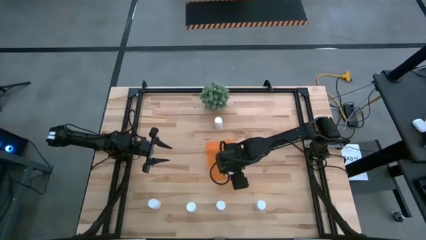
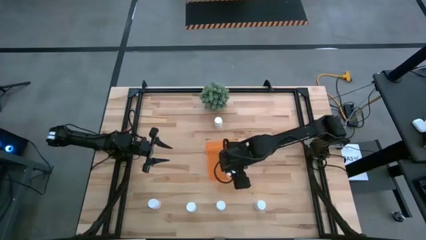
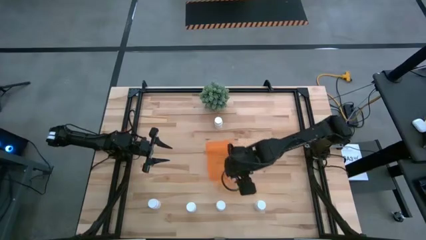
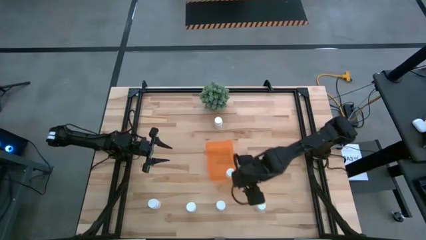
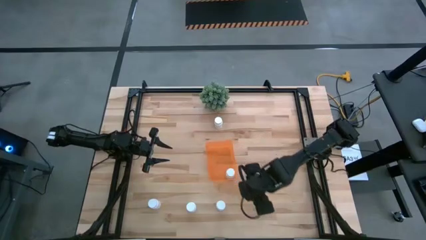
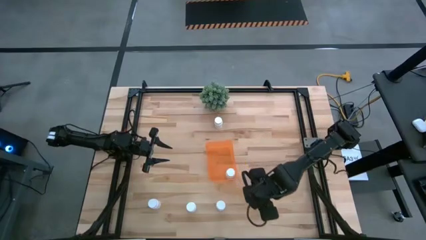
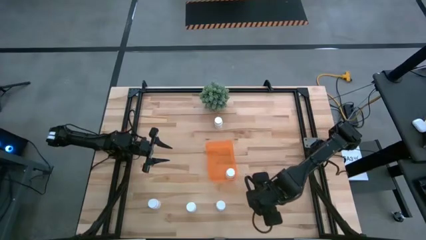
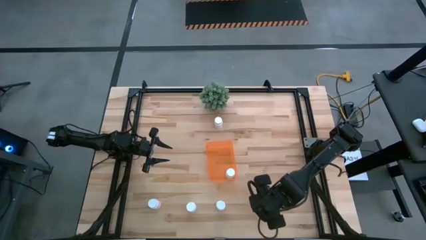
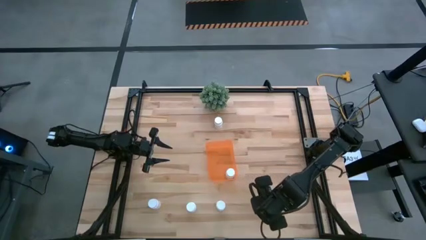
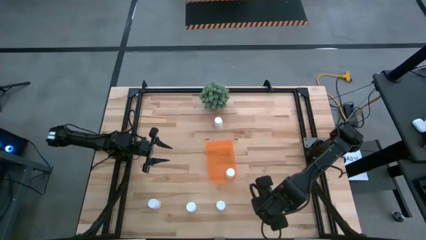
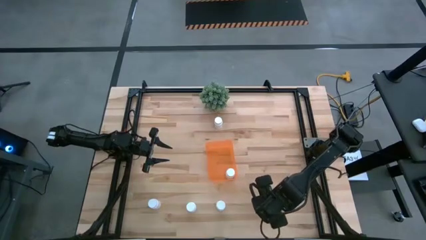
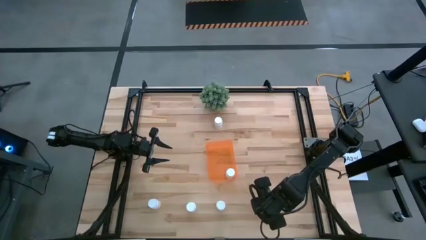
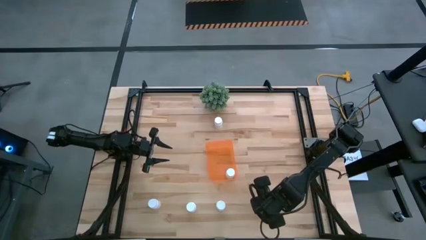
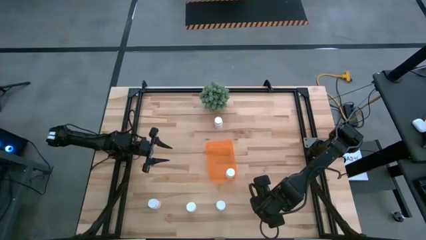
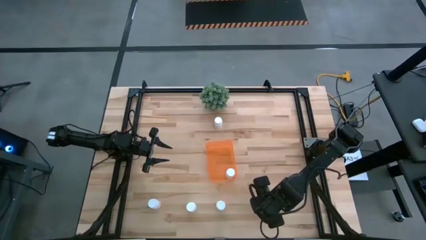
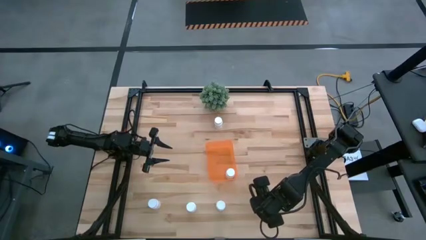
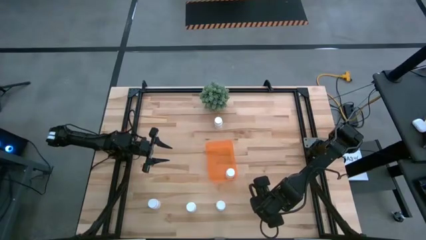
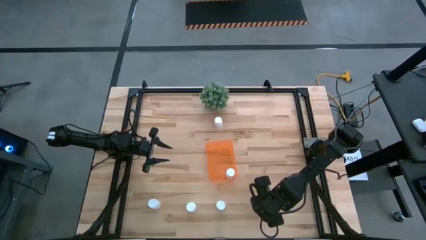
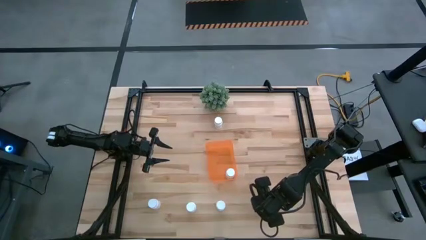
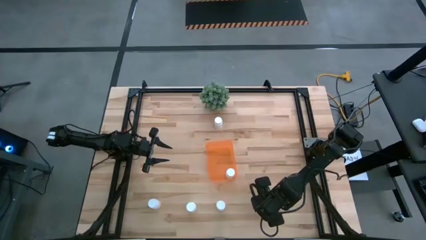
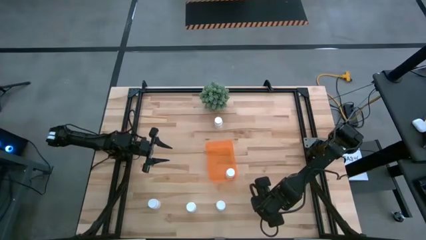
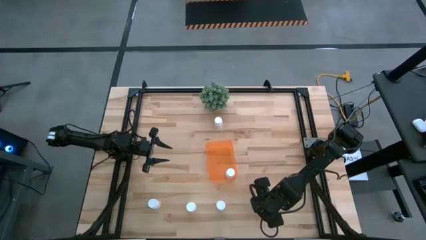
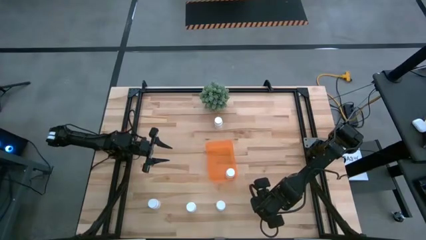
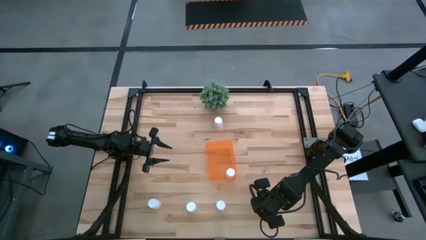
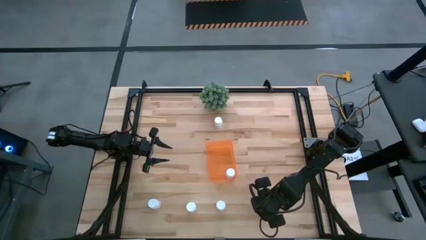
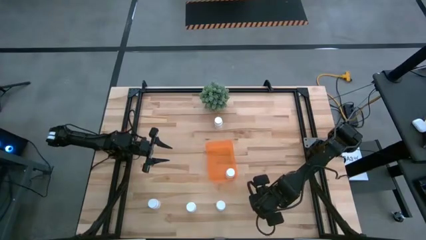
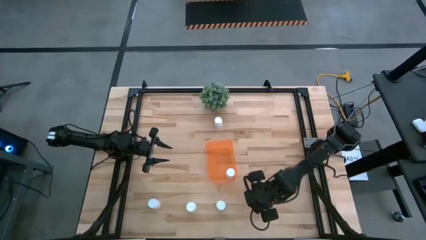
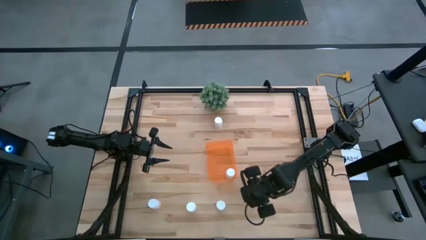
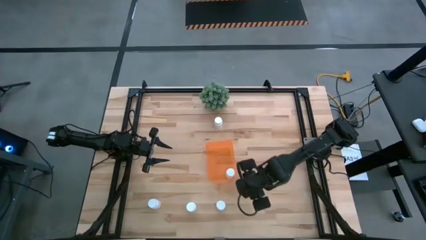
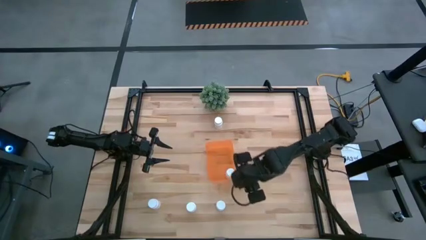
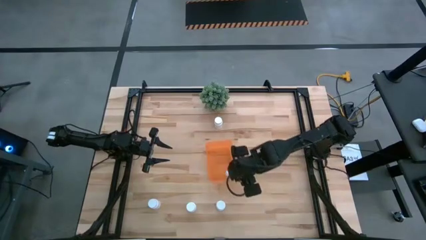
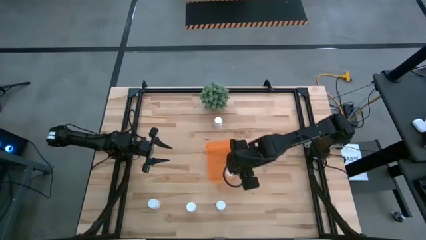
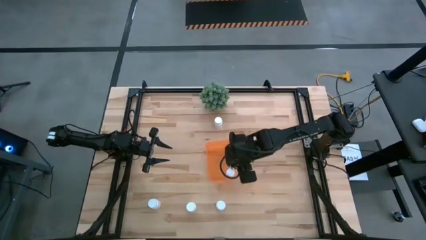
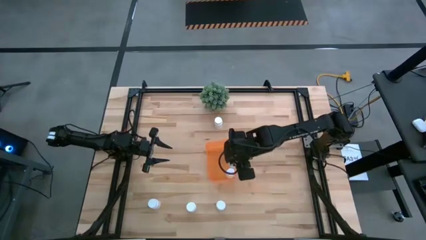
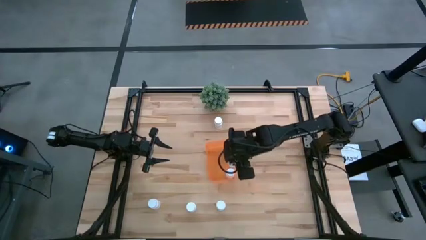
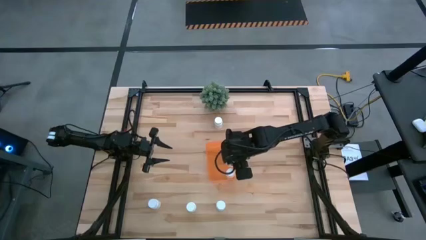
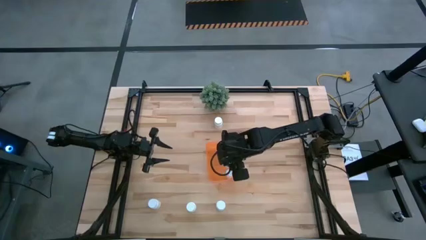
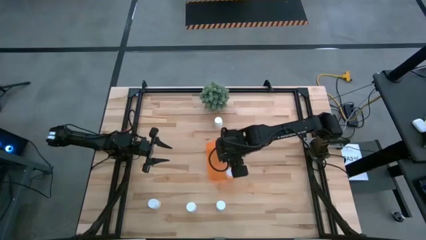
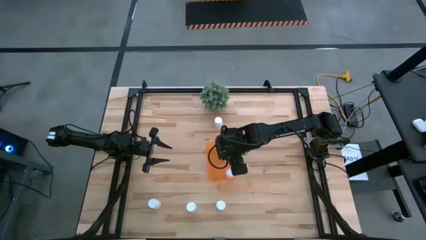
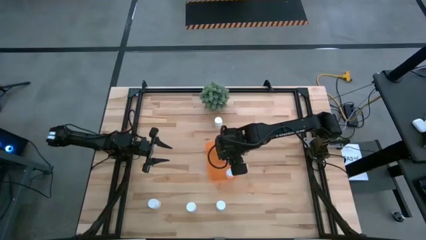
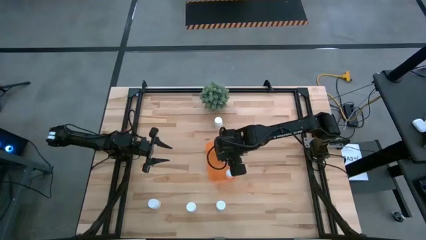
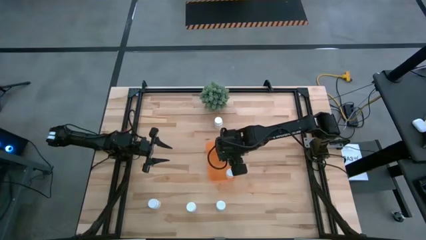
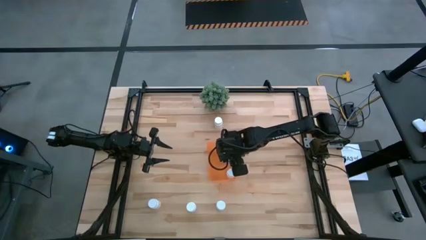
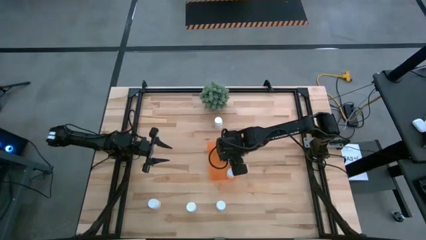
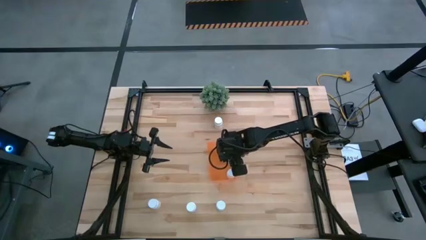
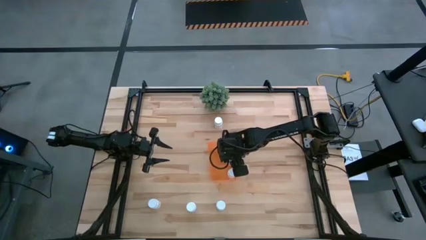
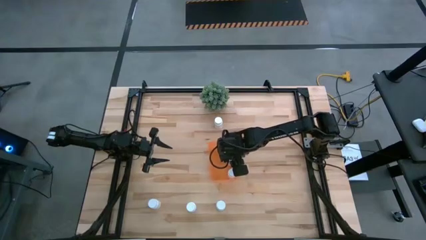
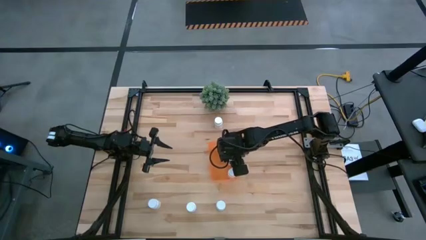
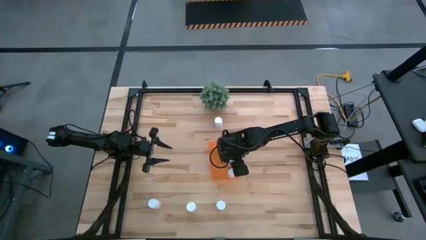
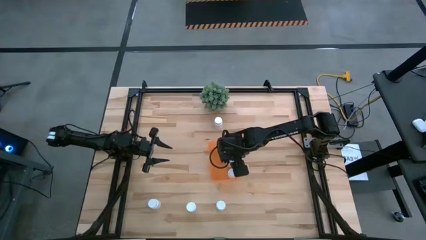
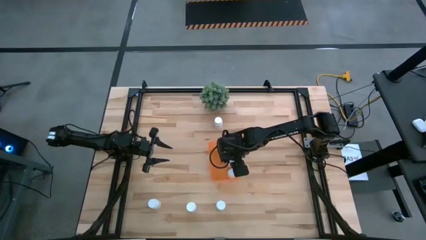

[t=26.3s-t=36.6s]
Task: Pick and place pill bottles into a basket
Put the white pill bottle into the orange bin

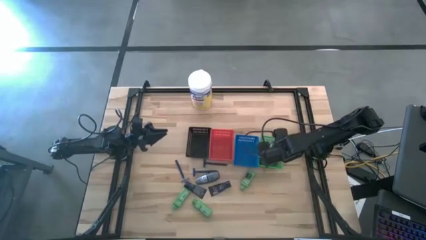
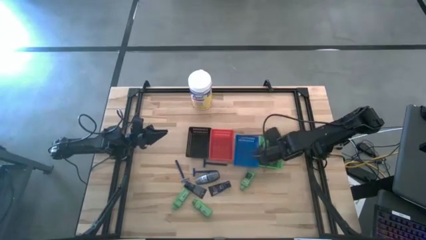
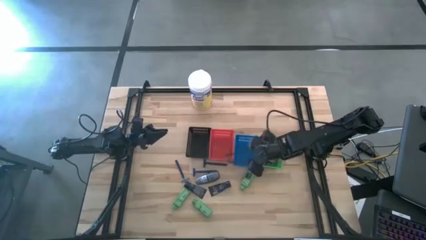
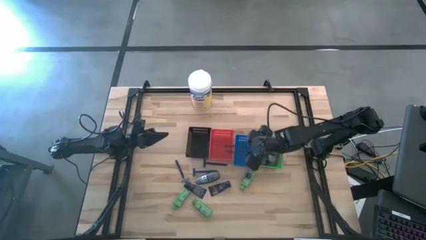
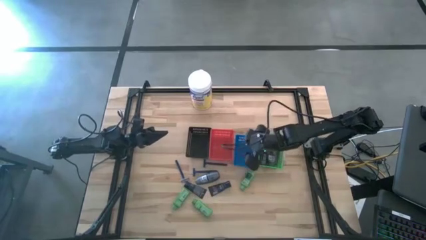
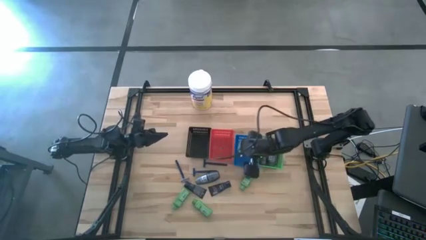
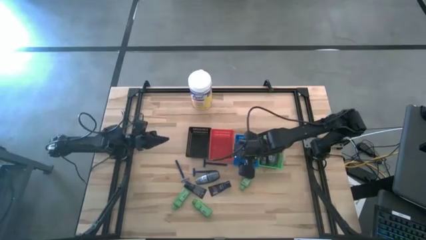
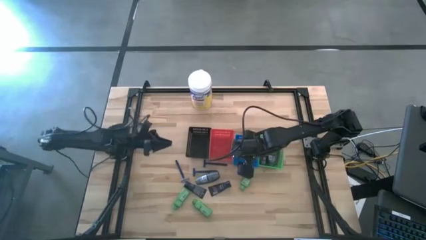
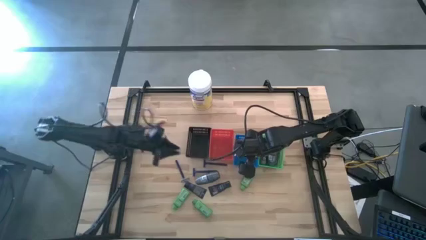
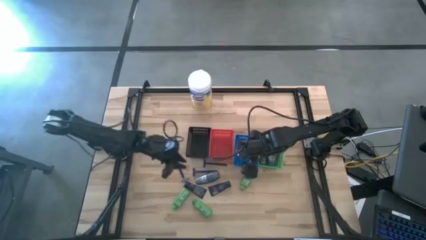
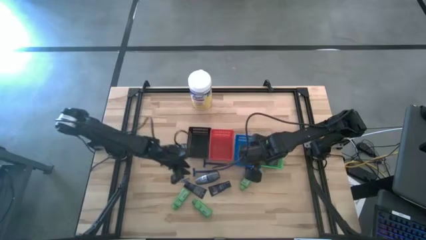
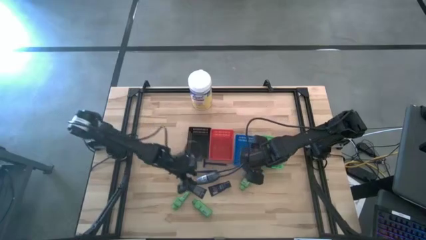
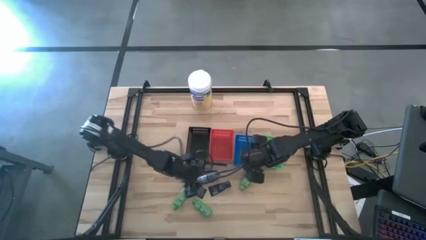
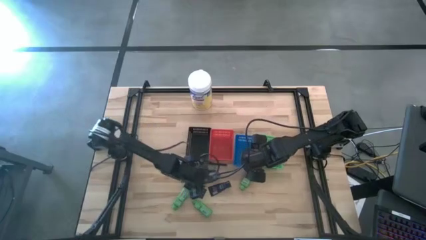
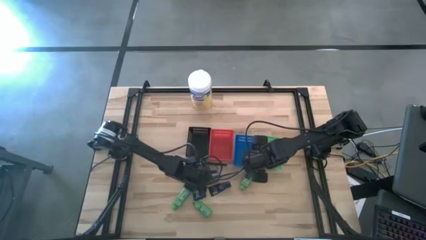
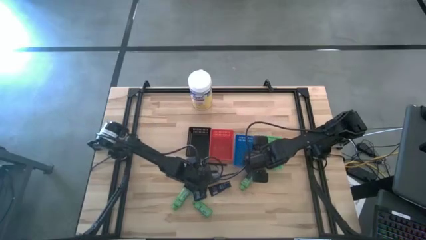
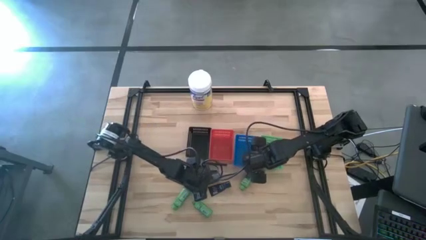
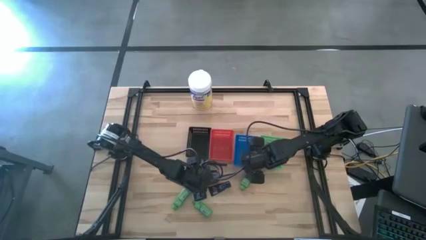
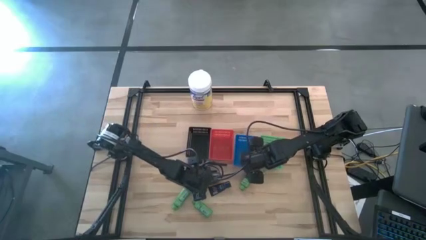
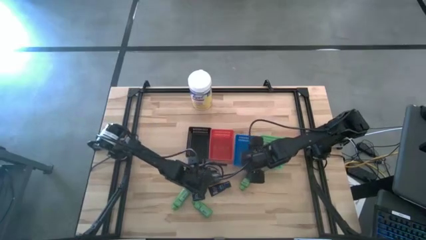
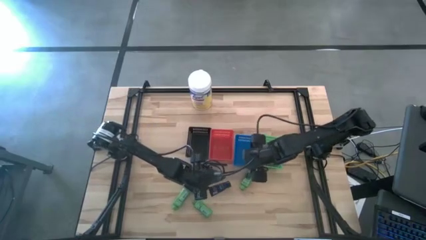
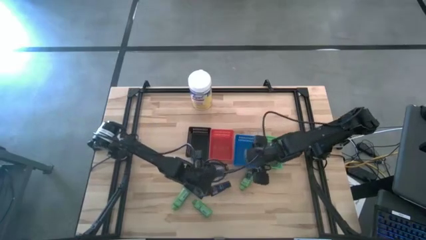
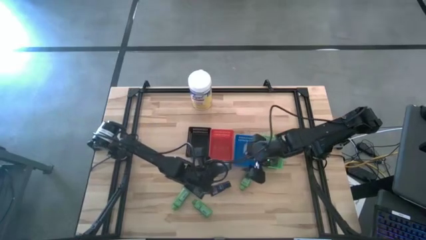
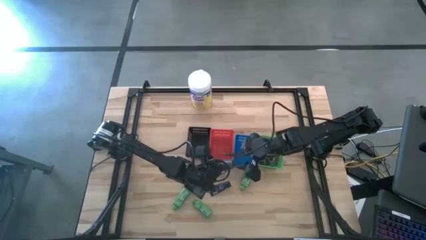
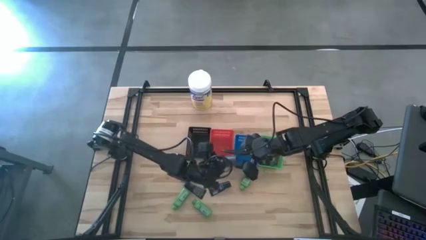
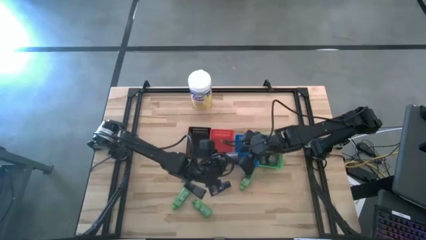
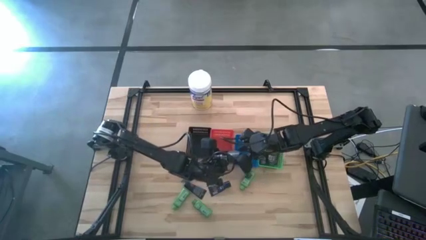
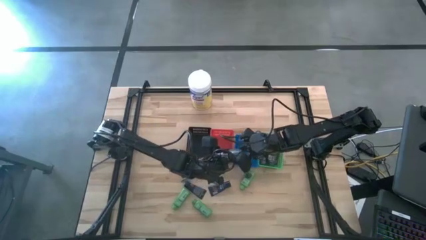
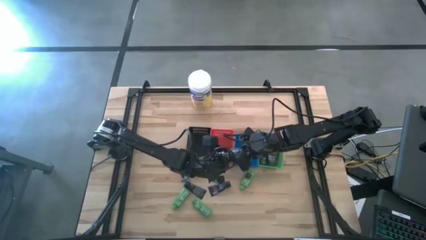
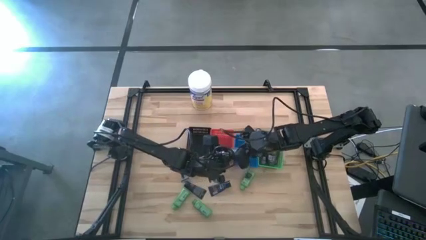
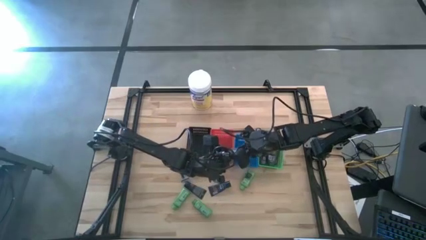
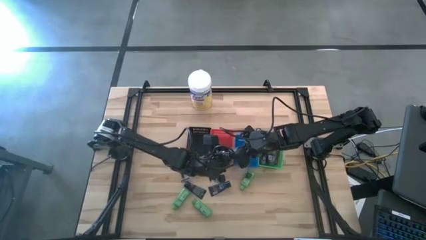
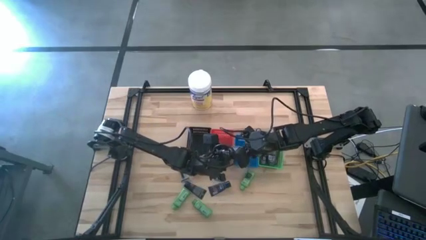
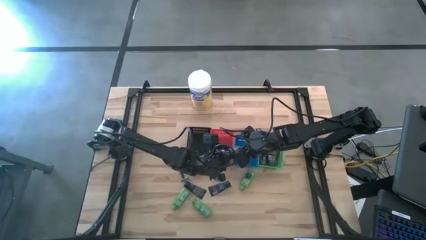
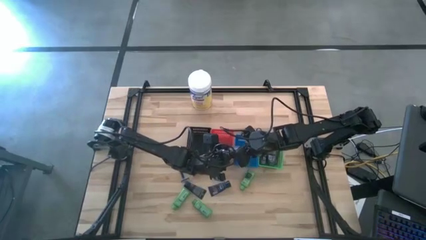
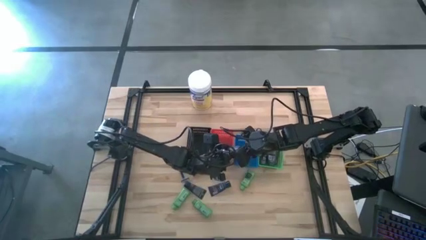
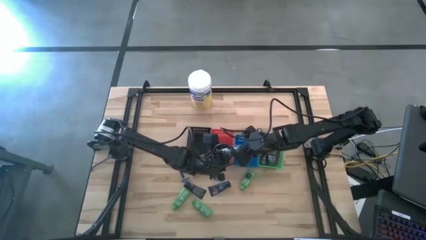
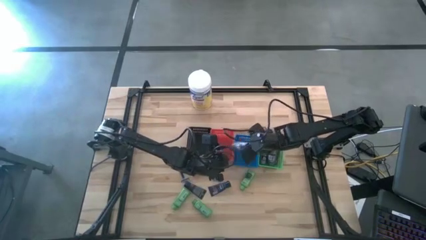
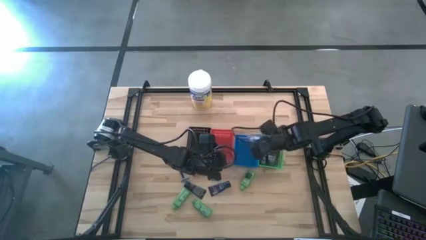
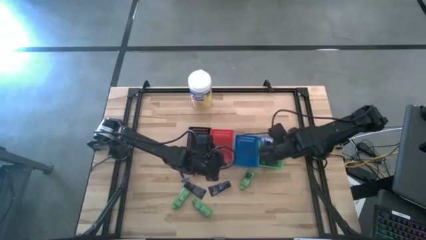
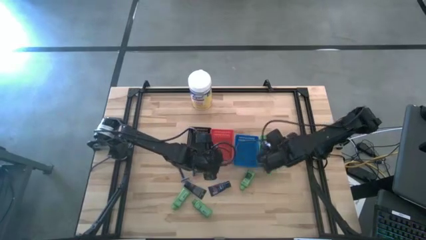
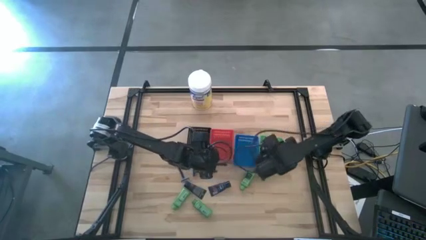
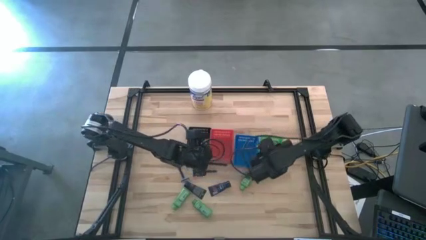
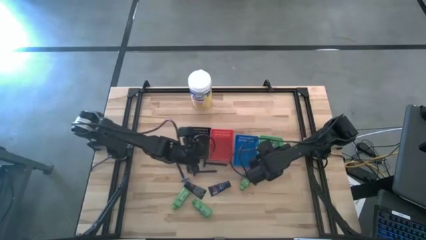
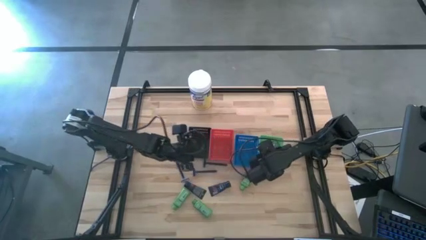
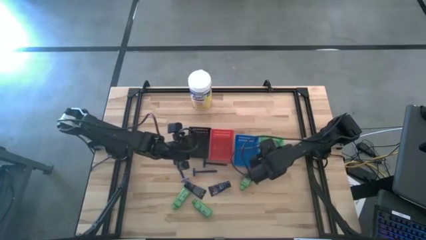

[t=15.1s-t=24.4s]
Task: Pick & Place Travel size toiletries
Put the gray deodorant into the green bin
